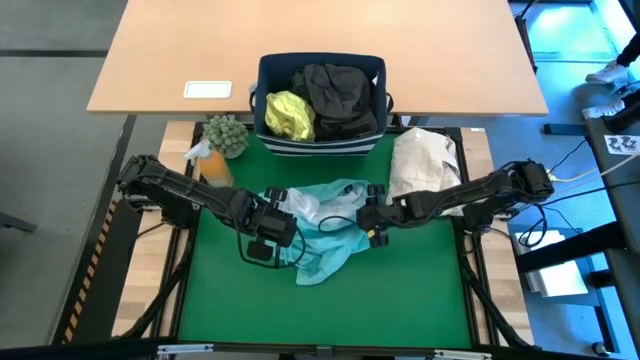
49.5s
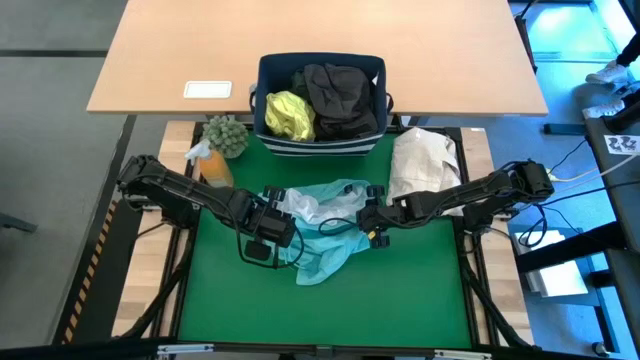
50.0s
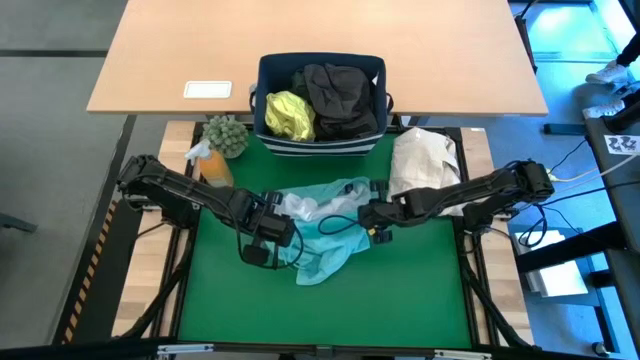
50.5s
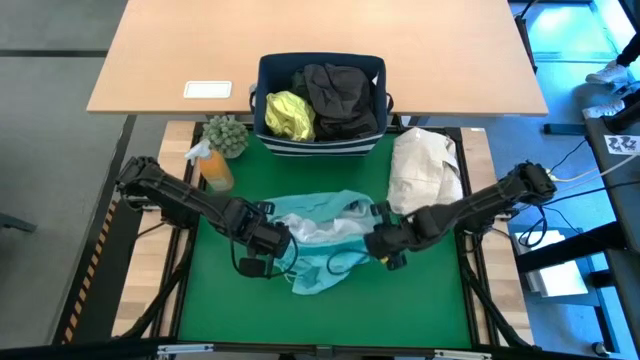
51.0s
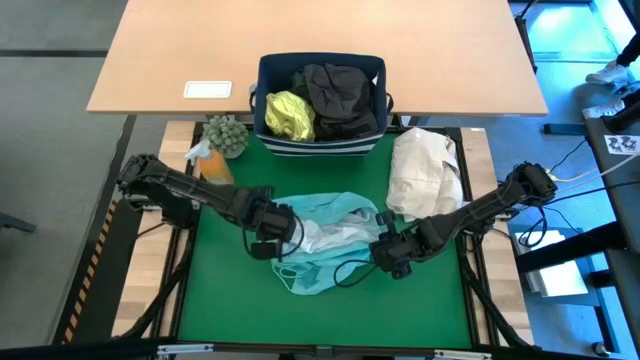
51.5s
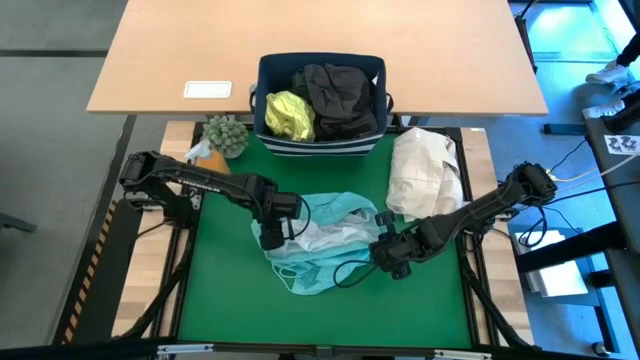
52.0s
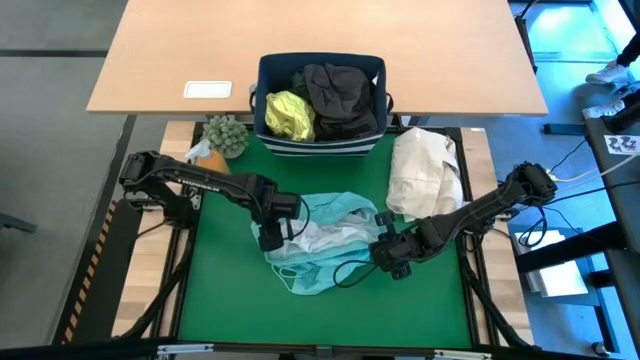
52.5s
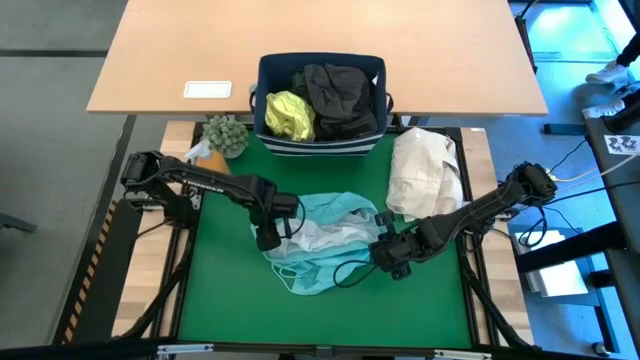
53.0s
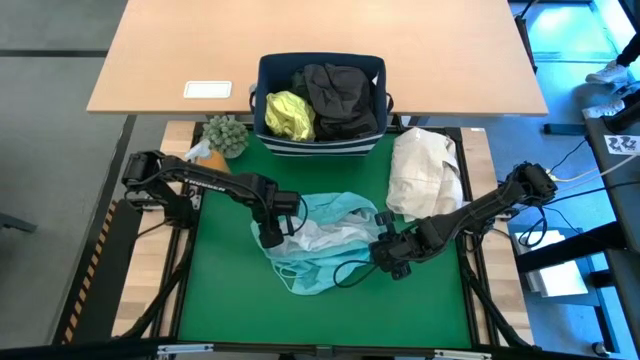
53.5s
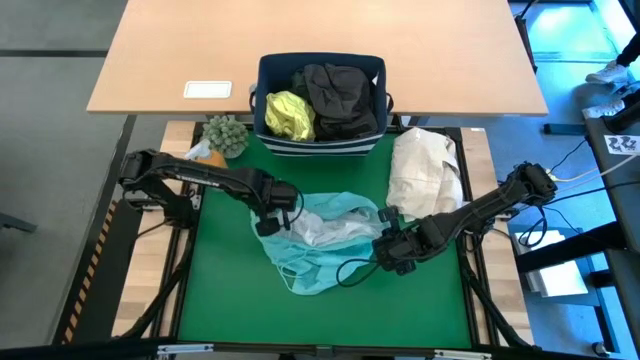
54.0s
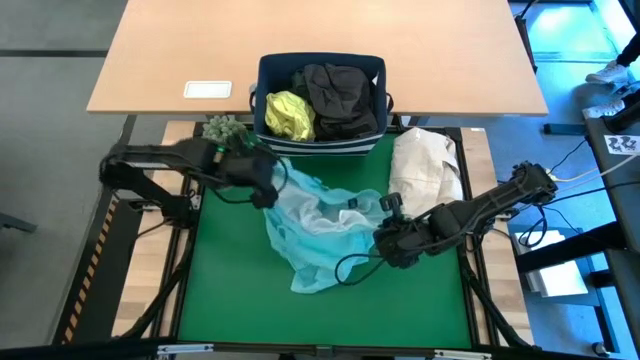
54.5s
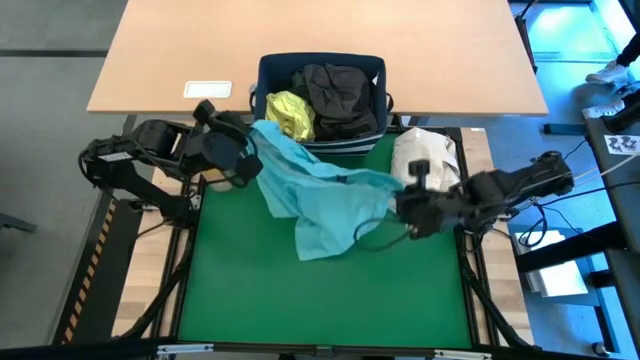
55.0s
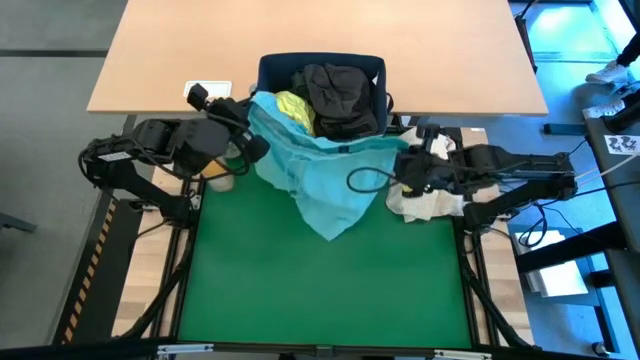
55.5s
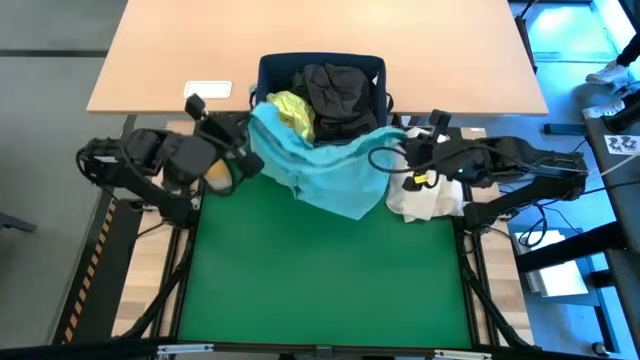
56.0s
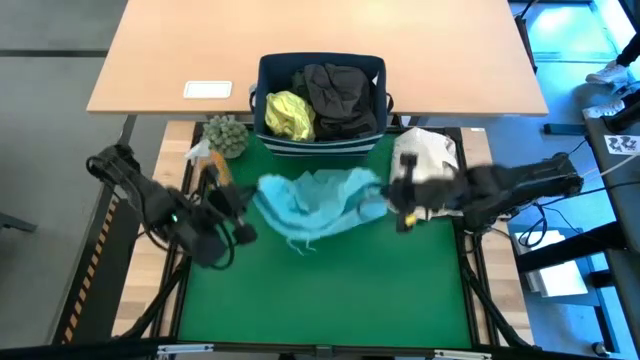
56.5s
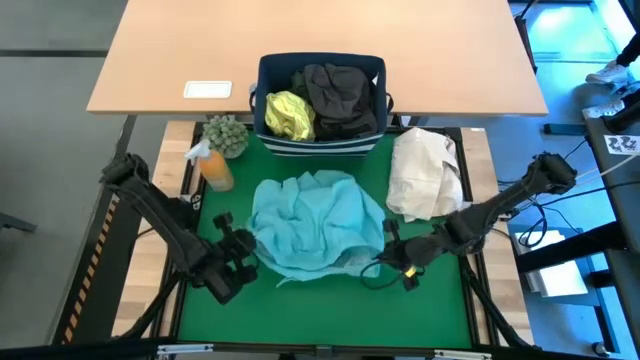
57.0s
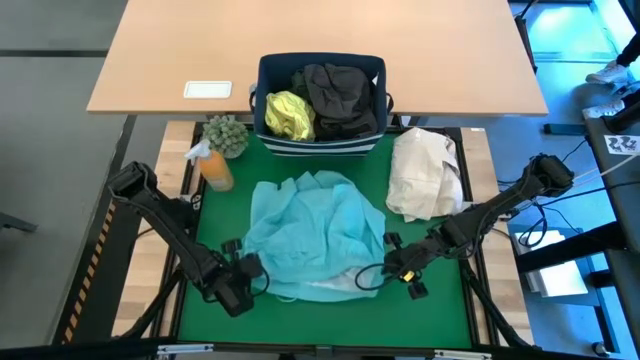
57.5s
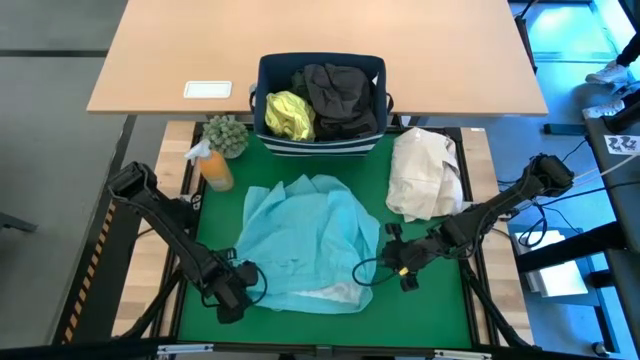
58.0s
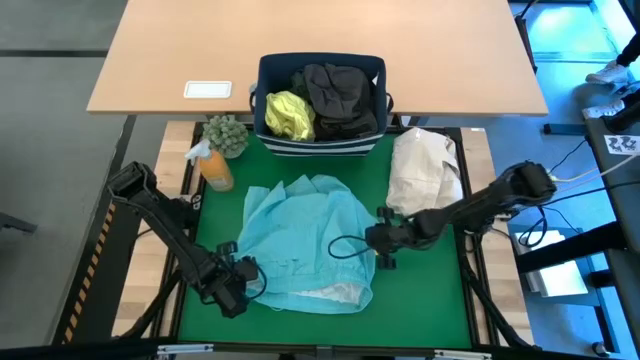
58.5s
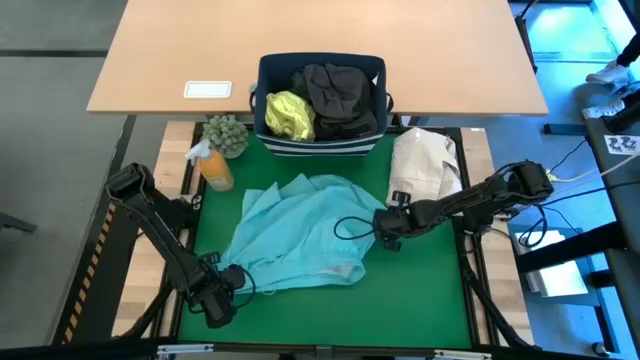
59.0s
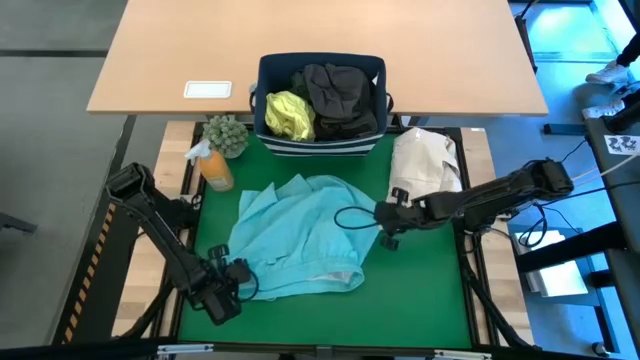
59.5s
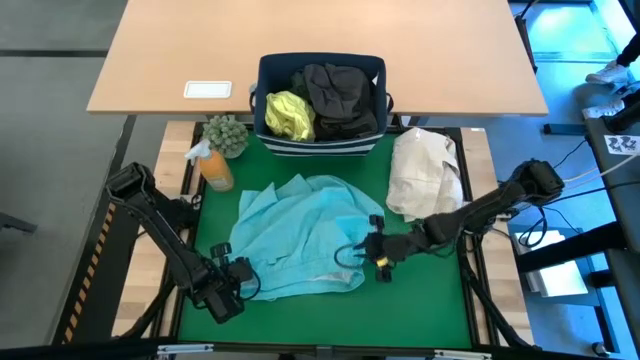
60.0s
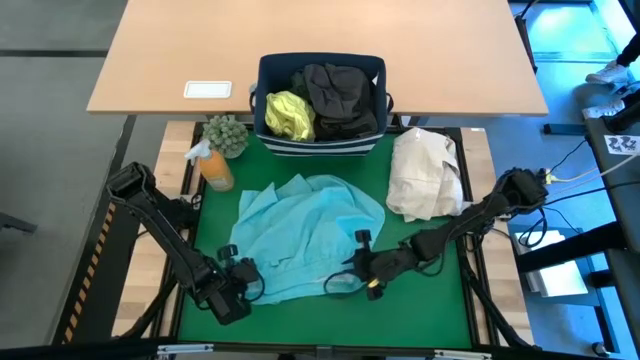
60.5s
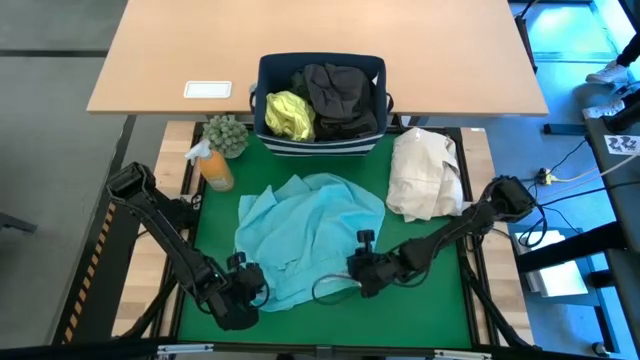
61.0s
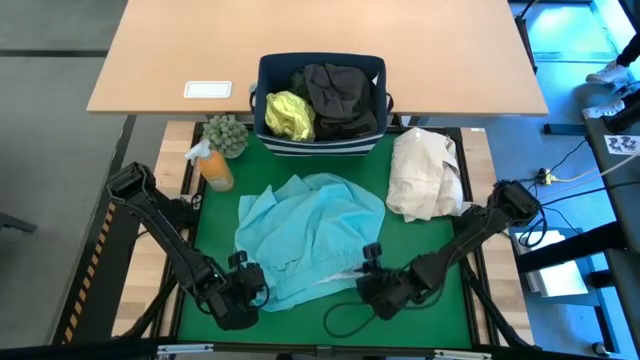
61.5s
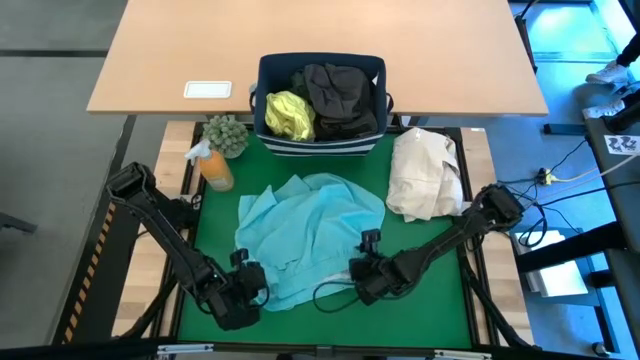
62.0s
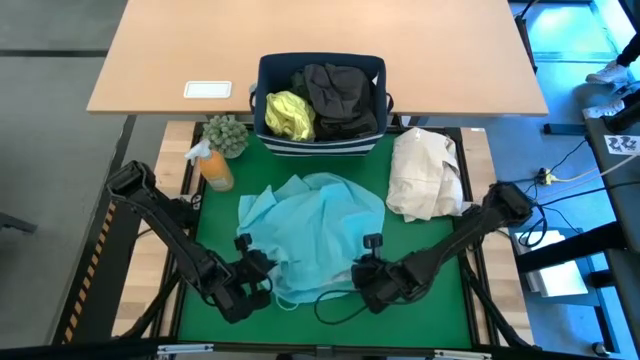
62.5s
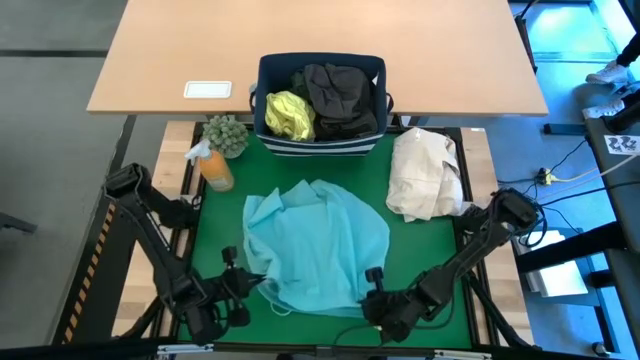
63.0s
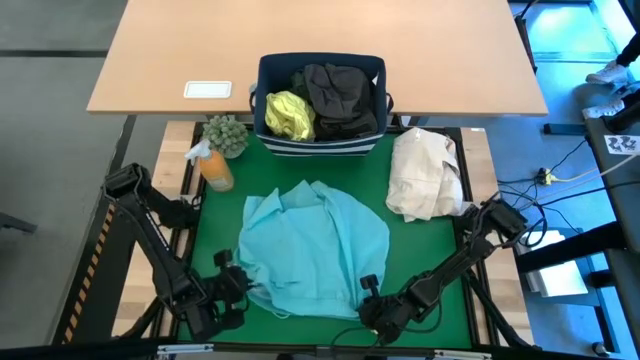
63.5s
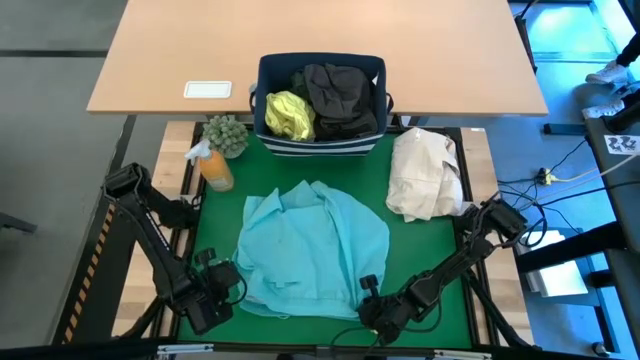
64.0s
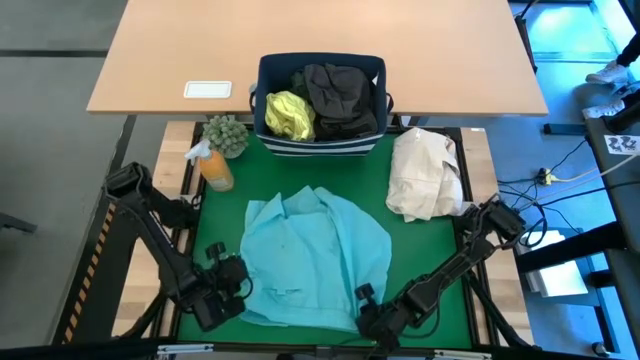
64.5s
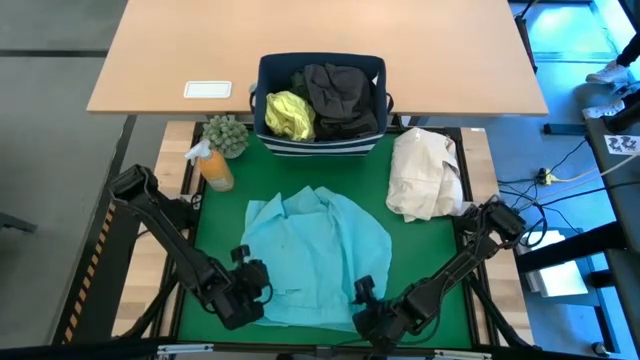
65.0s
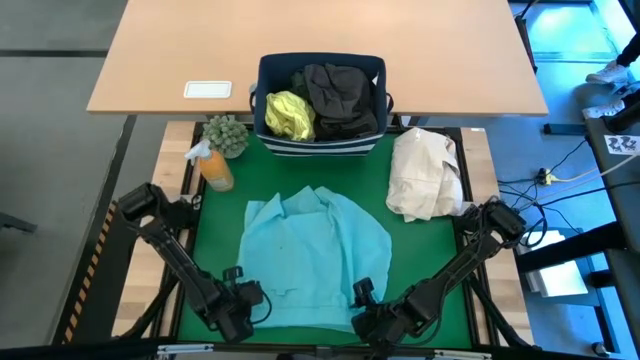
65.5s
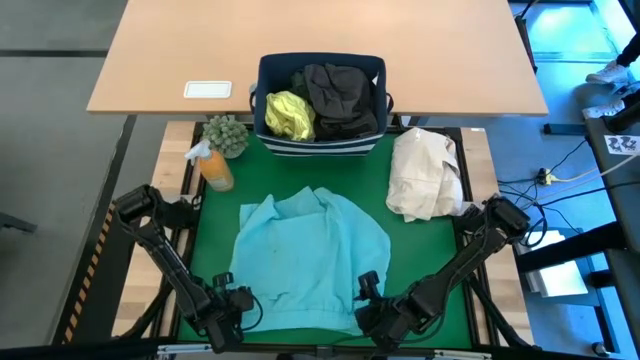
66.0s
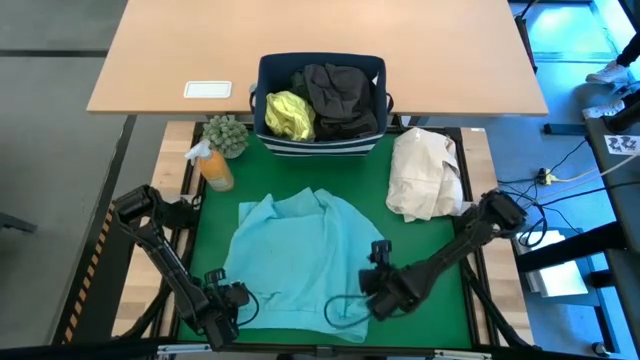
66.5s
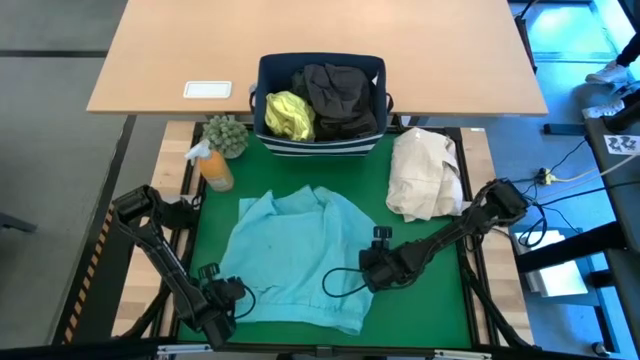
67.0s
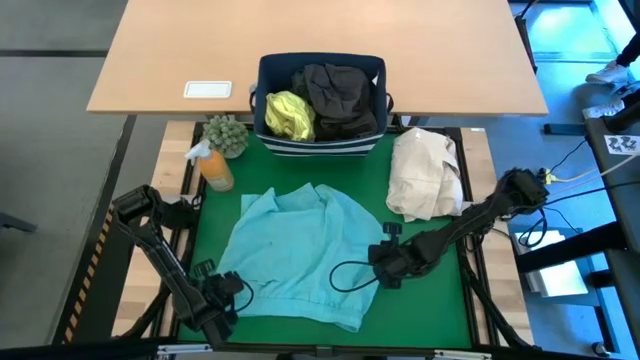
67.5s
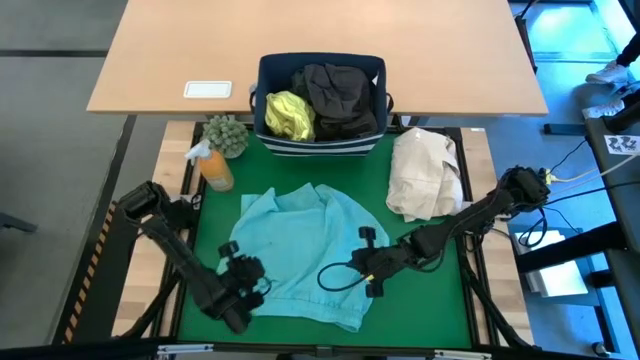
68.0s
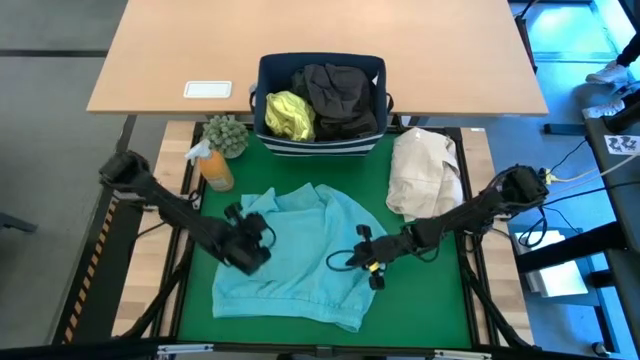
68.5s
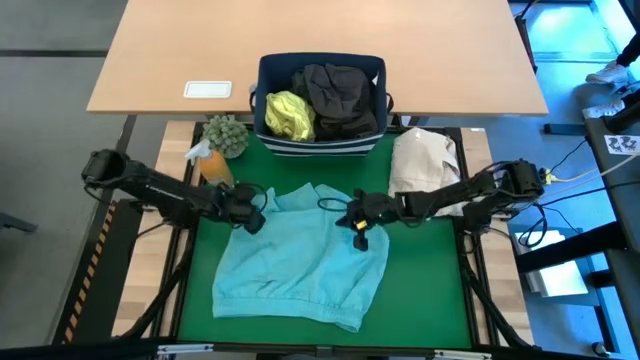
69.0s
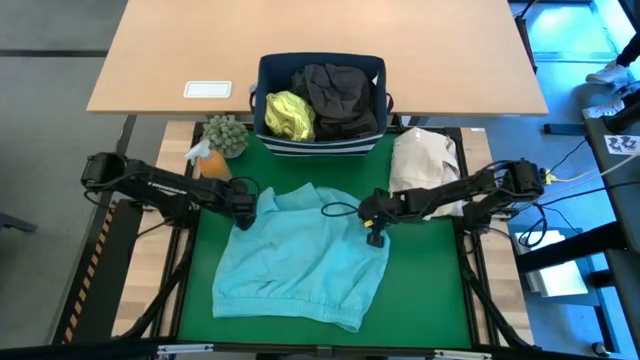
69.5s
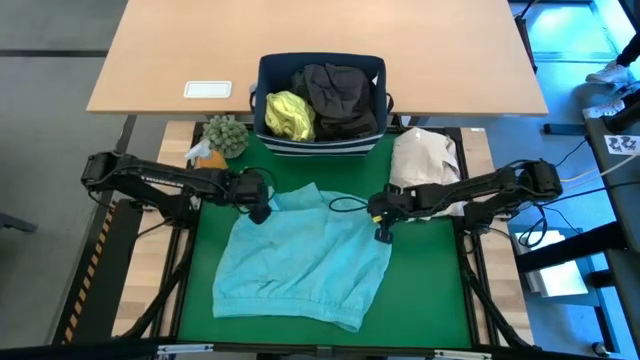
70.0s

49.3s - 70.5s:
Task: Fold laundry
Fold the blue shorts
